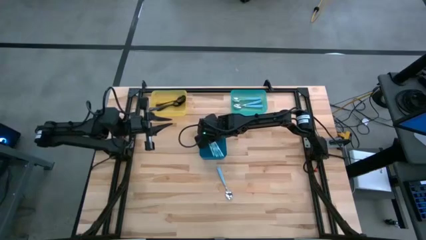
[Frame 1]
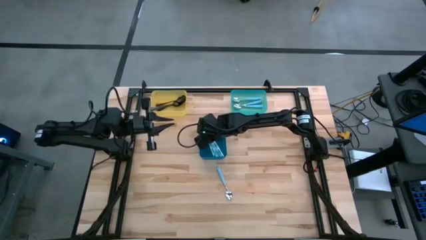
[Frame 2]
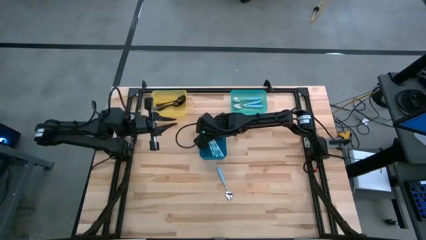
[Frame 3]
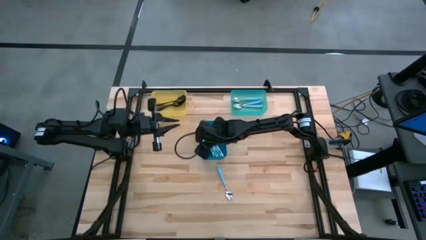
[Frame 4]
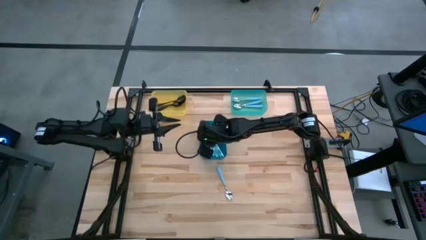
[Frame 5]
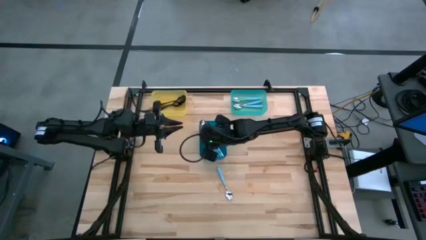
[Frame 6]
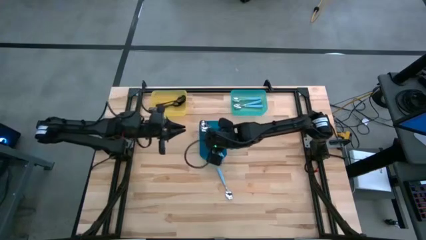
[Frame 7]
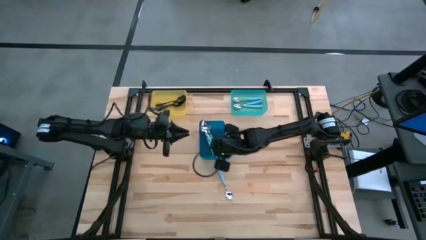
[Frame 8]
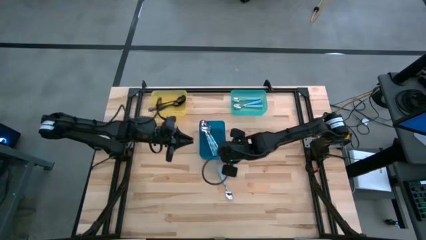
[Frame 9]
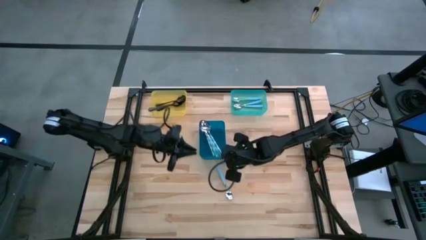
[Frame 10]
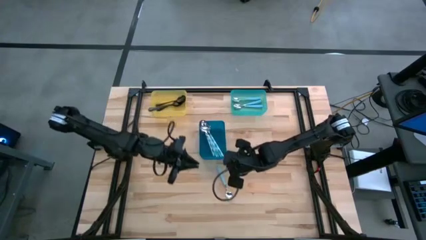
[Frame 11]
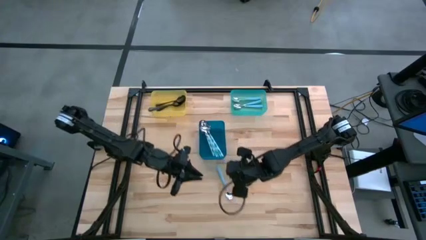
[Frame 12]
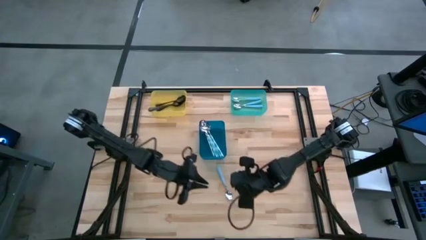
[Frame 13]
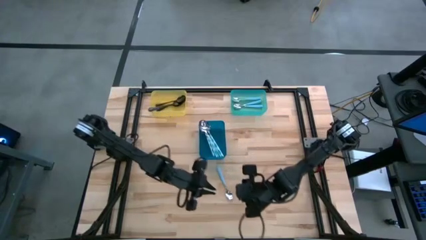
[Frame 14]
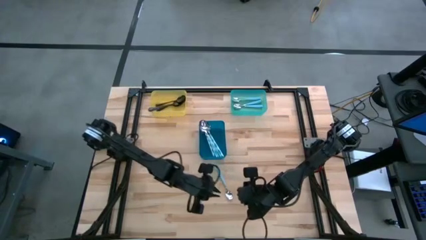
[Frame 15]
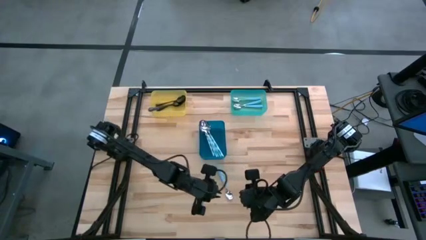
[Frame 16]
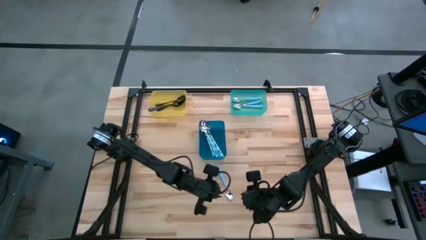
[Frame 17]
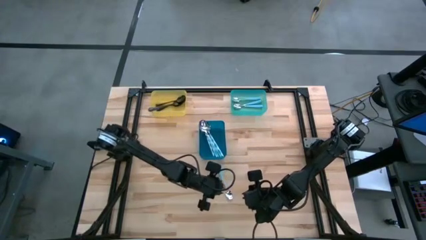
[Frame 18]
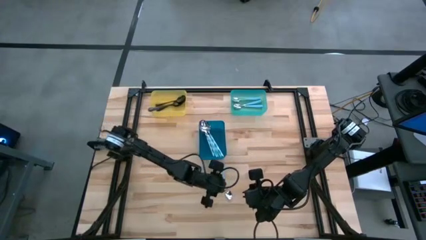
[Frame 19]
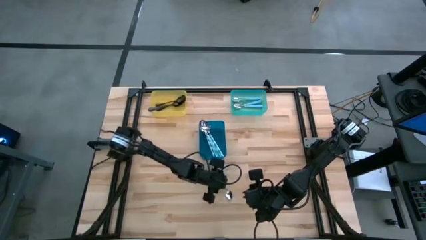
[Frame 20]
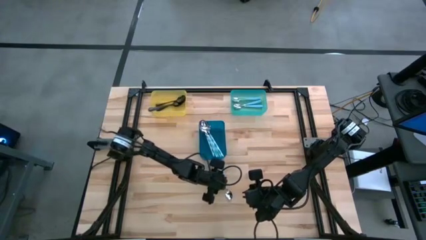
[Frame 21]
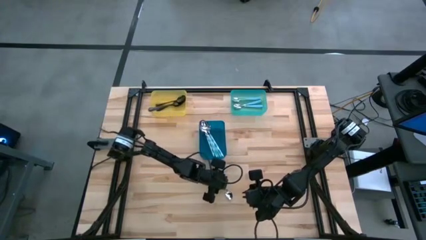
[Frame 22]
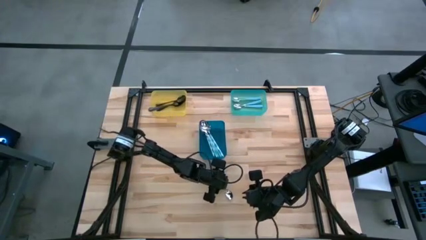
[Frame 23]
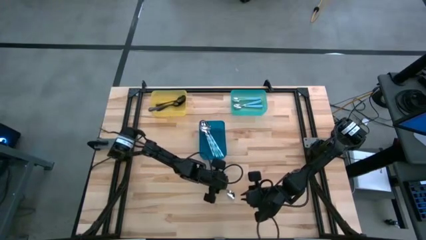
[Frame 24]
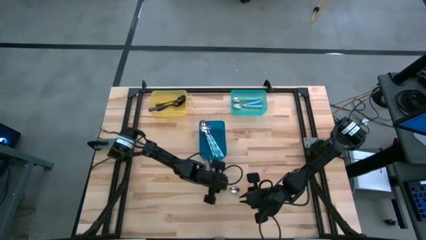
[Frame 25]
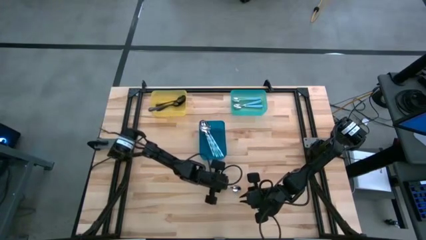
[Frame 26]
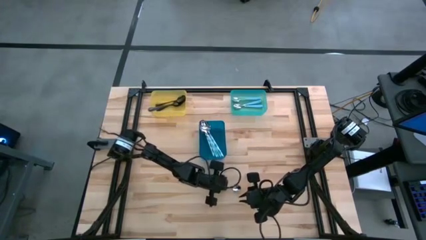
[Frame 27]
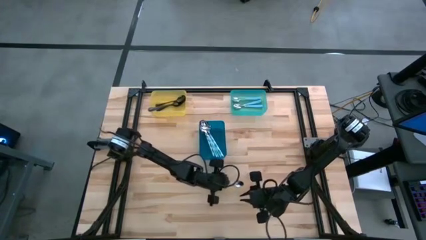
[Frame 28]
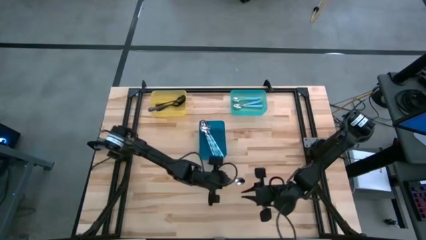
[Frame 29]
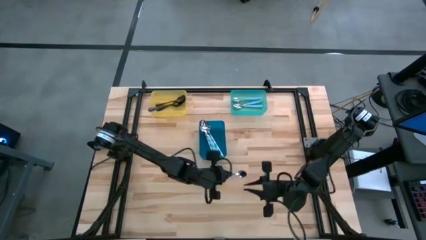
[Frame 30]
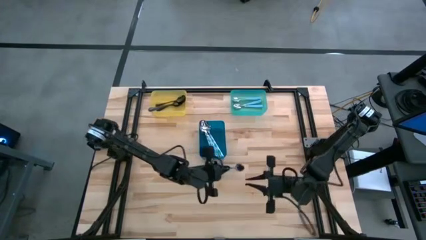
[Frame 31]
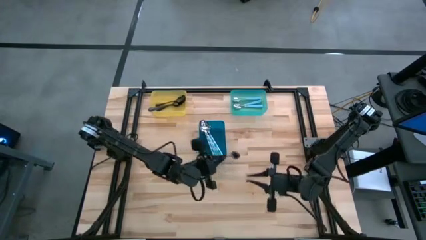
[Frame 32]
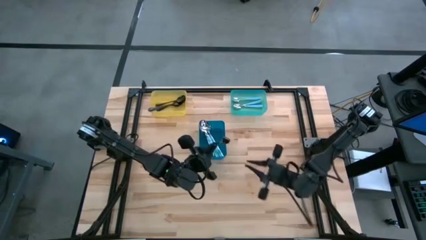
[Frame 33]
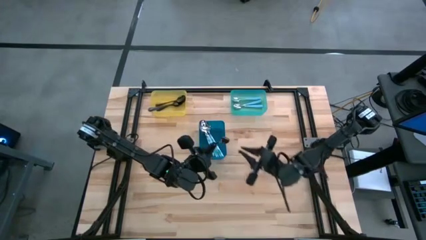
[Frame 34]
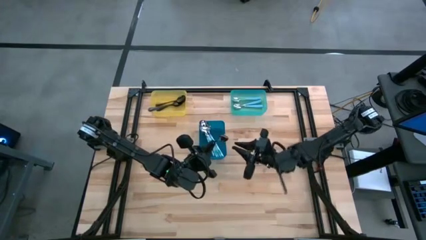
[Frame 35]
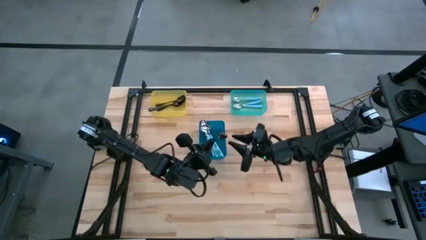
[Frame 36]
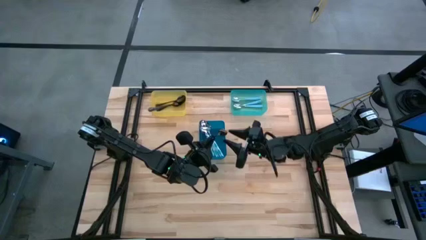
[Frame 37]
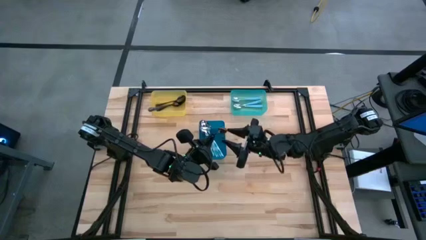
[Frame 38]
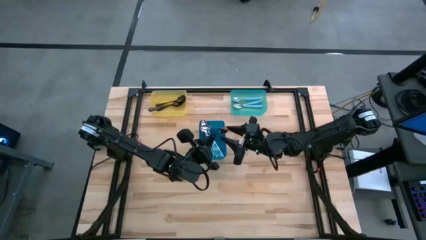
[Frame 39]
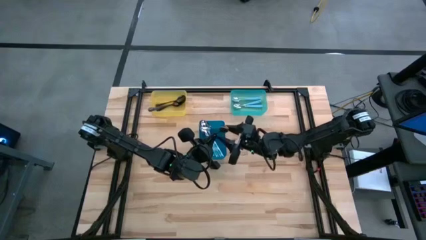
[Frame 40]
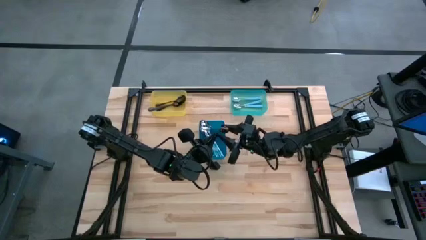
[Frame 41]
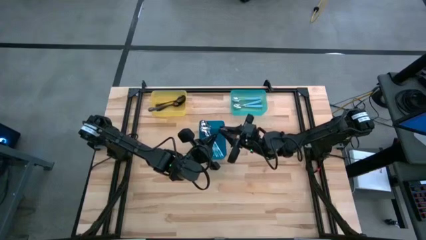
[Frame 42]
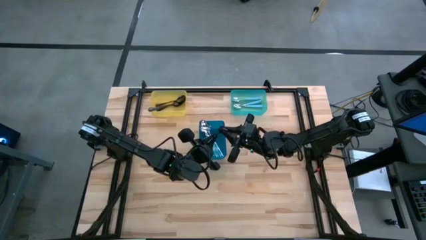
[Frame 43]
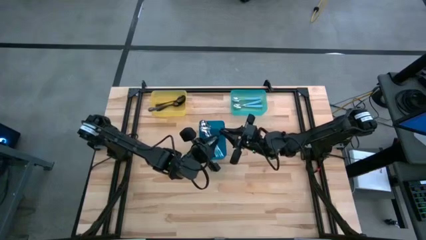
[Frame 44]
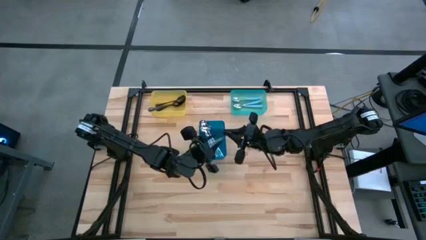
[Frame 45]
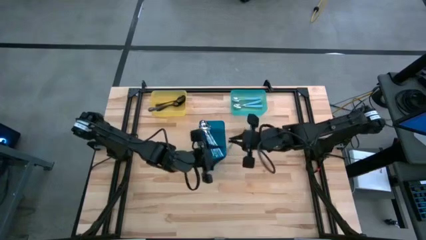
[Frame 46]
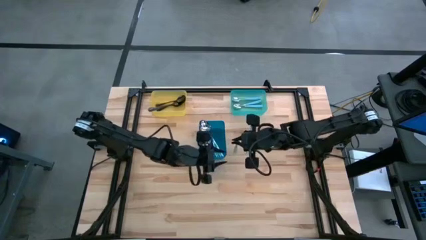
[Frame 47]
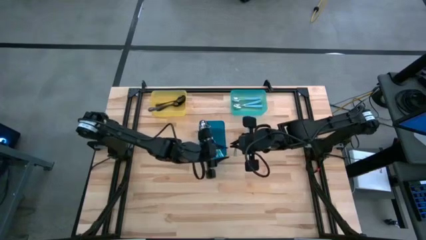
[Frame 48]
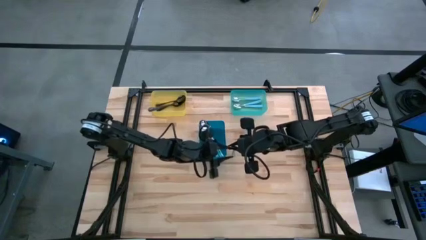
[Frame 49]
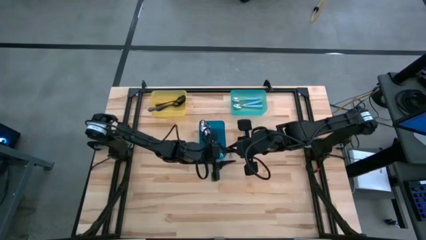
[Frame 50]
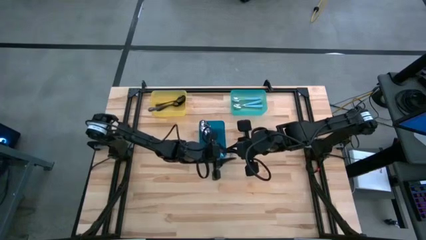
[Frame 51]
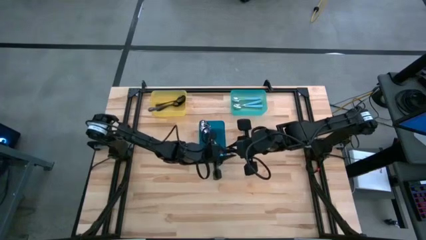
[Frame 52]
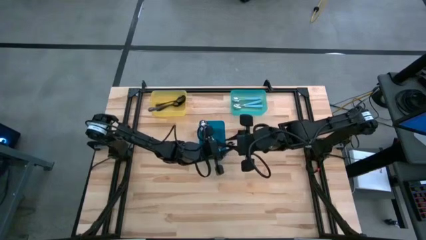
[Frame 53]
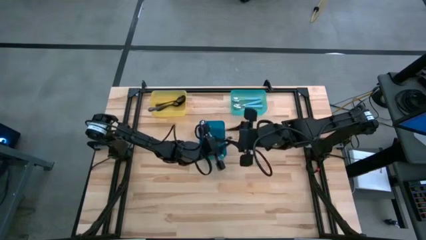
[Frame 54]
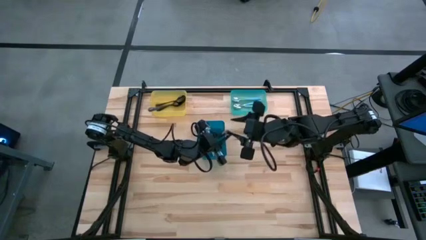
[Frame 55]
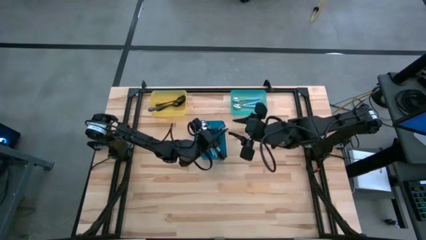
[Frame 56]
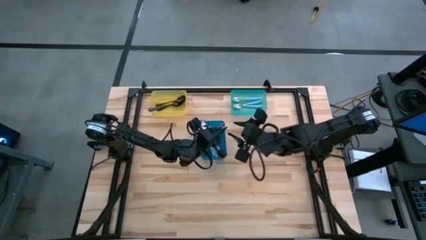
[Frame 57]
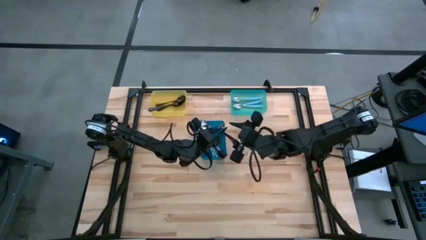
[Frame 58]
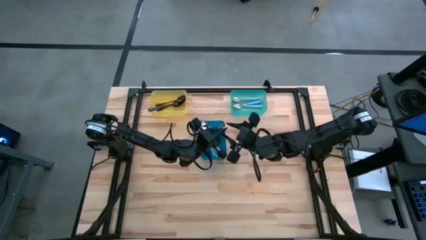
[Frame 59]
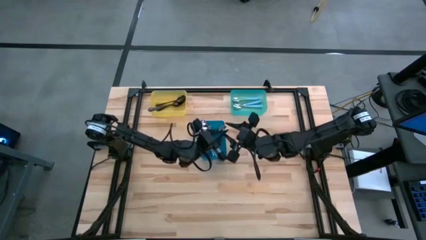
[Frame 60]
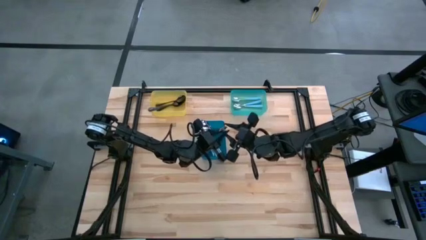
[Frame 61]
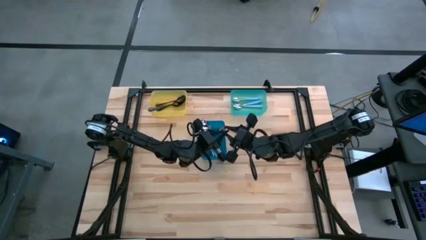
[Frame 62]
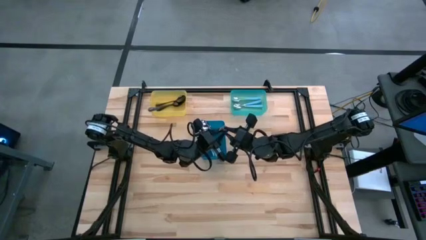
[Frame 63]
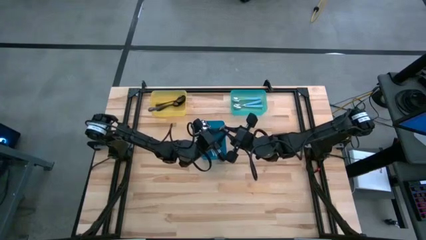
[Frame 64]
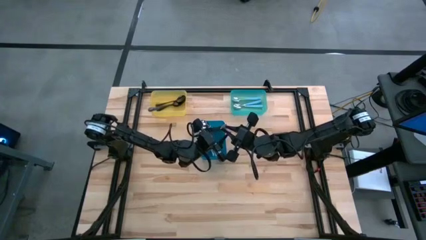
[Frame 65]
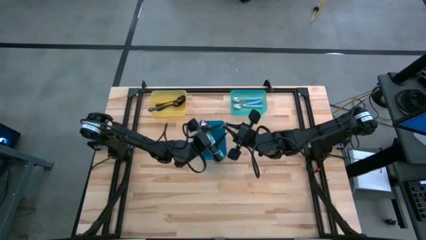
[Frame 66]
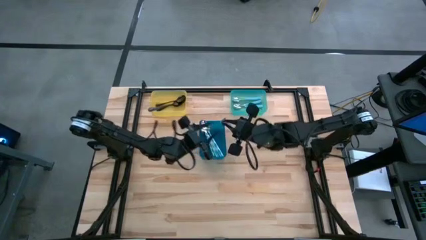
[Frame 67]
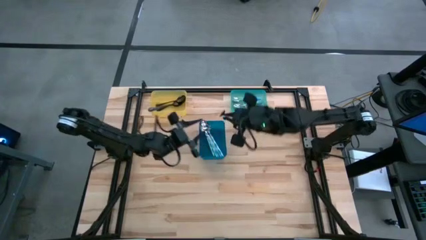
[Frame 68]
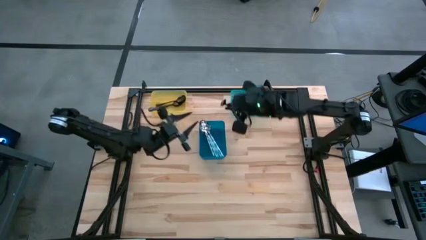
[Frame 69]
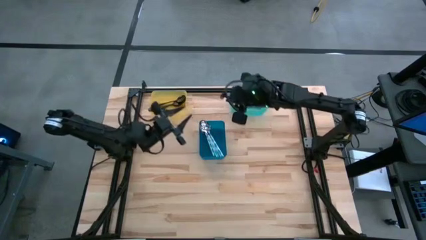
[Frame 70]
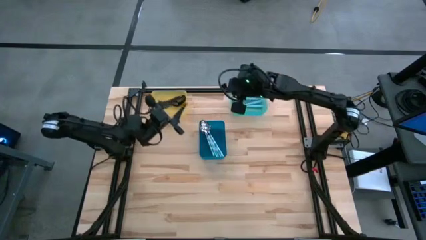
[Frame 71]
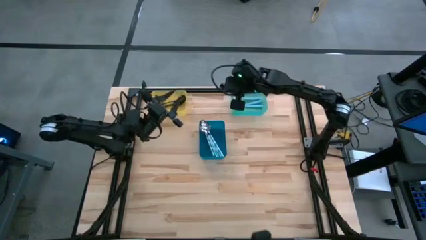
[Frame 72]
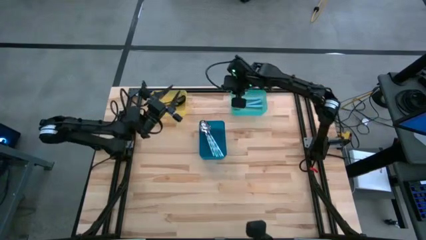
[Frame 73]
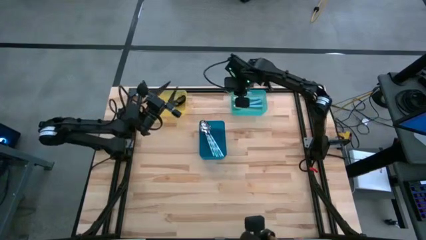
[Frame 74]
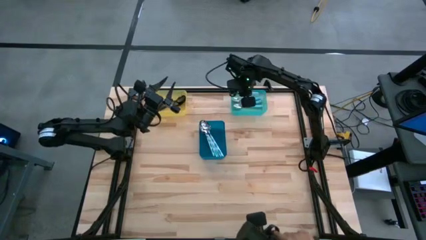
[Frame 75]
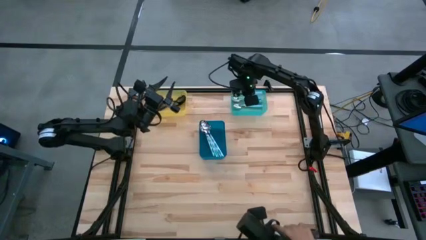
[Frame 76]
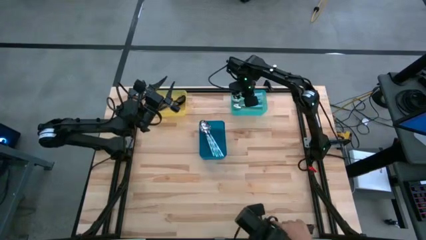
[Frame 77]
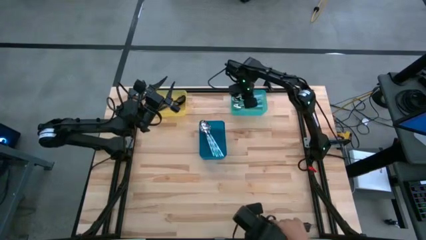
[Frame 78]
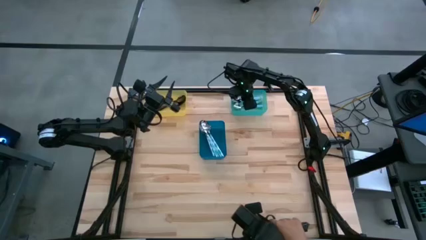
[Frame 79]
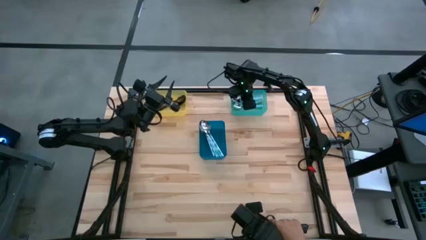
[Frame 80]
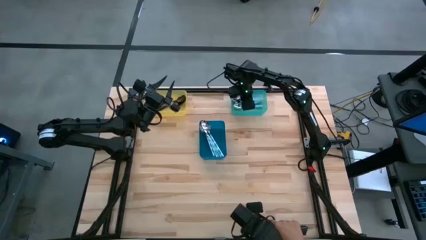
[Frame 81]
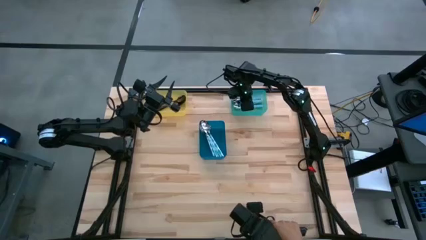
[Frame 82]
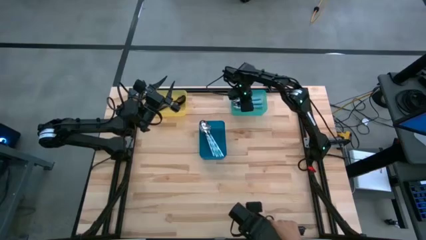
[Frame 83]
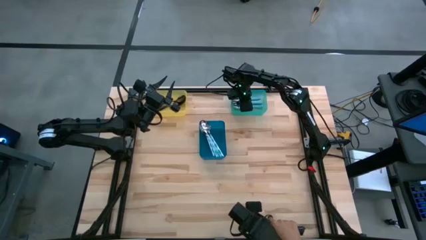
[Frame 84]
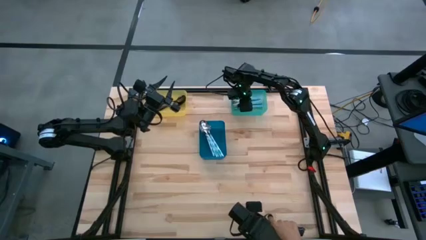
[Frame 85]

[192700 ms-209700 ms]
Task: Sort silverware by color (type)
Put the light blue spoon into the light blue bin
